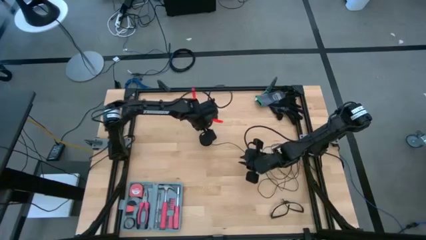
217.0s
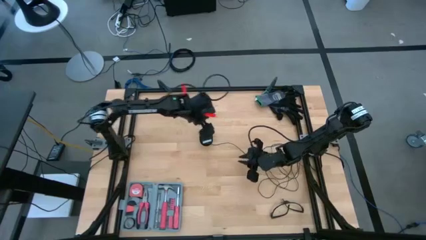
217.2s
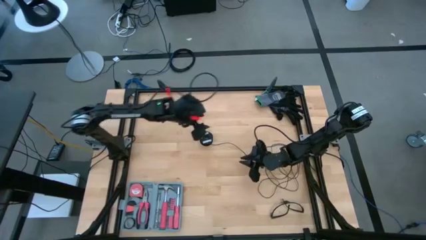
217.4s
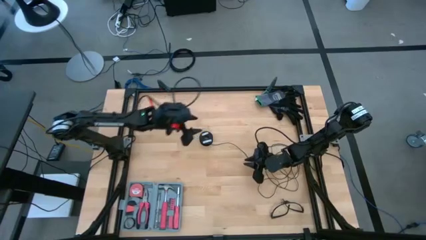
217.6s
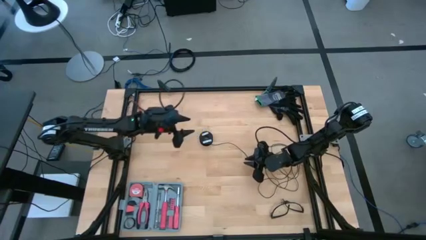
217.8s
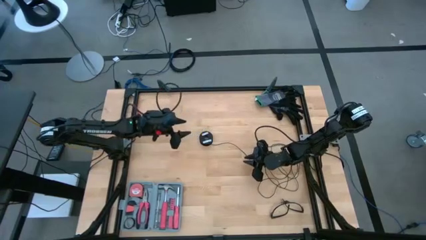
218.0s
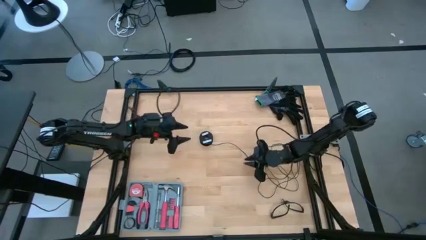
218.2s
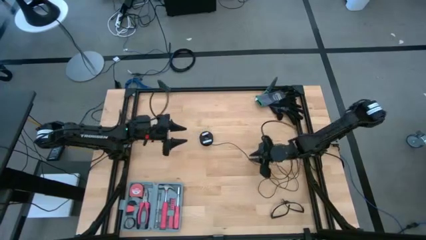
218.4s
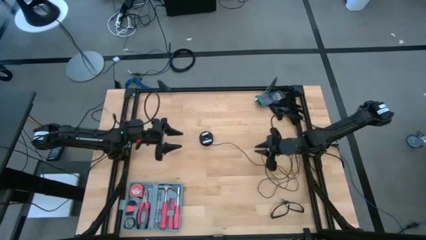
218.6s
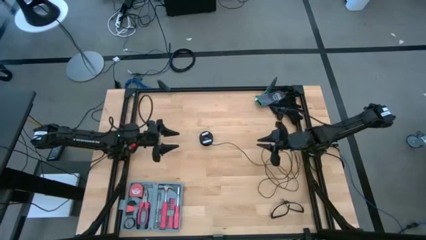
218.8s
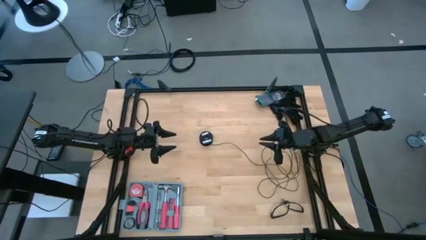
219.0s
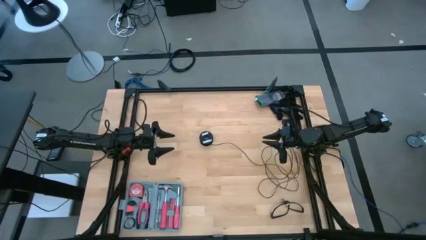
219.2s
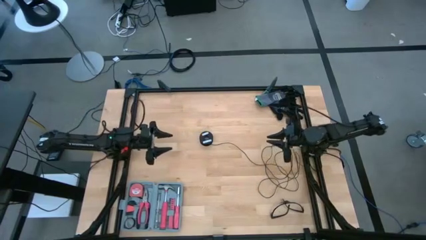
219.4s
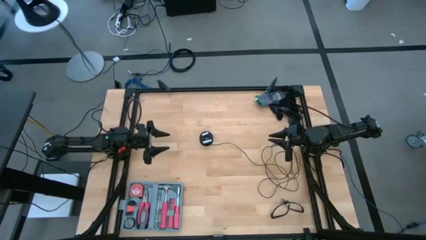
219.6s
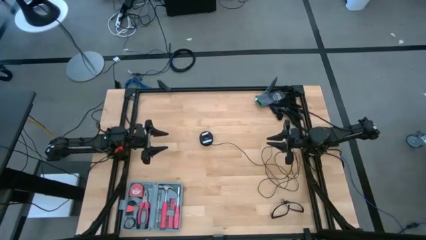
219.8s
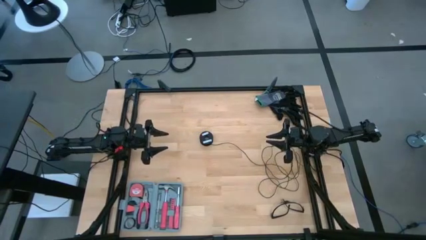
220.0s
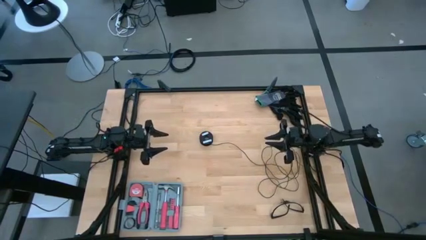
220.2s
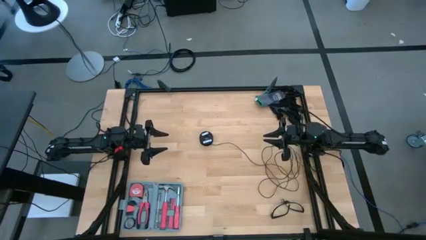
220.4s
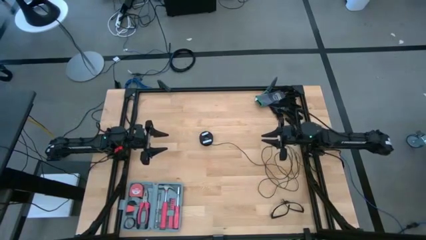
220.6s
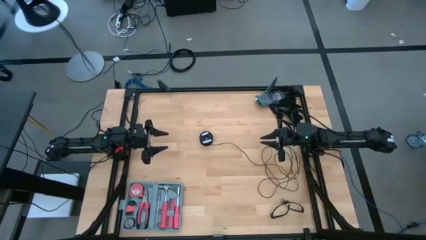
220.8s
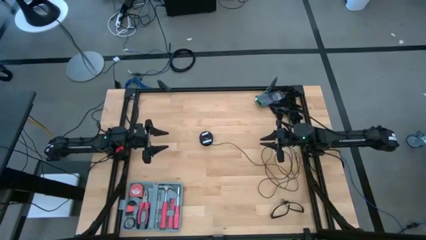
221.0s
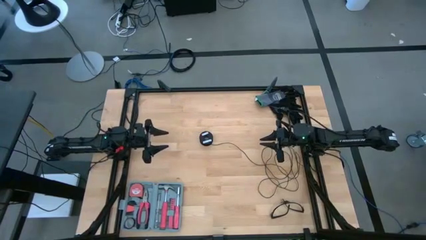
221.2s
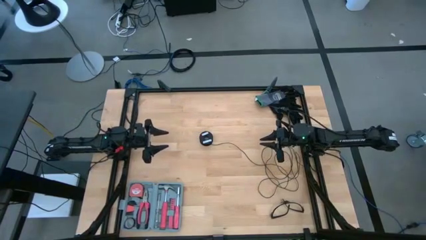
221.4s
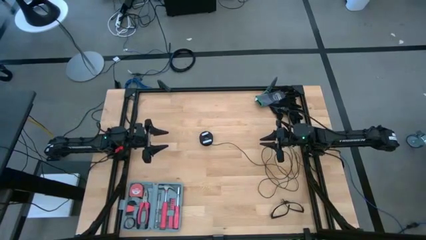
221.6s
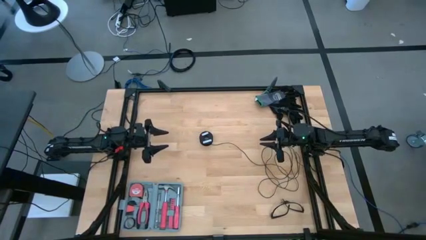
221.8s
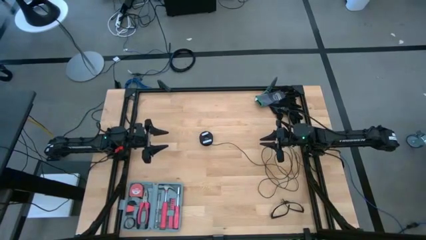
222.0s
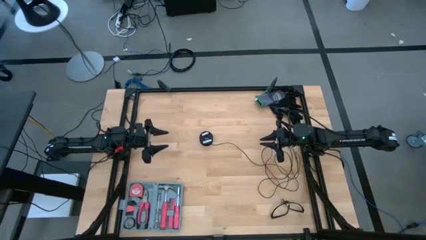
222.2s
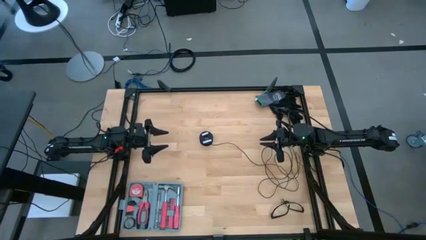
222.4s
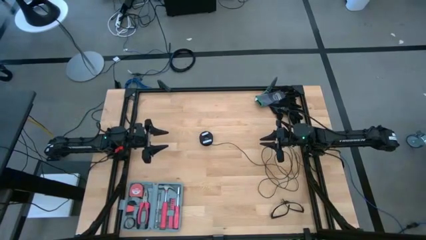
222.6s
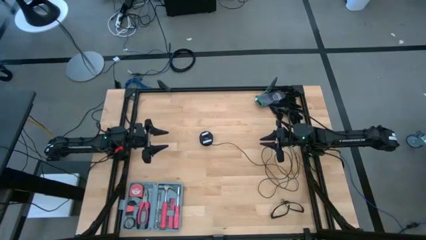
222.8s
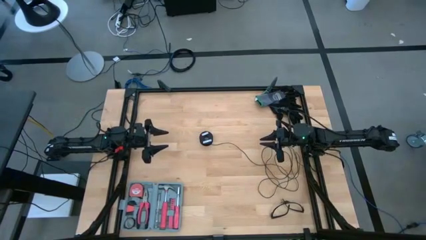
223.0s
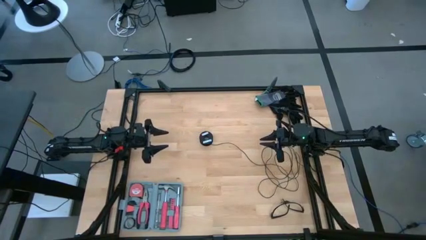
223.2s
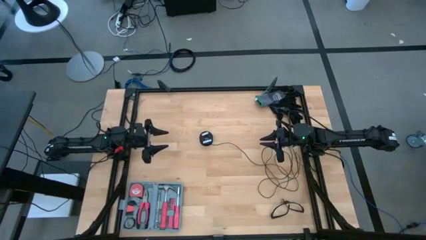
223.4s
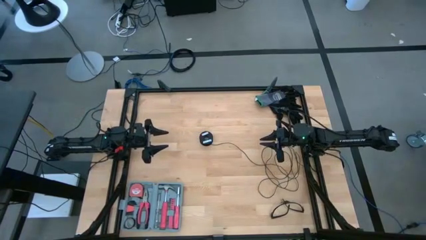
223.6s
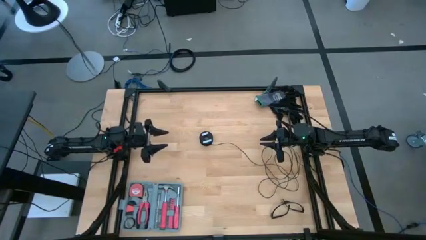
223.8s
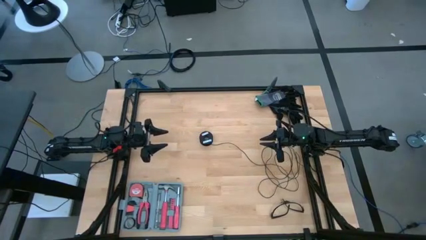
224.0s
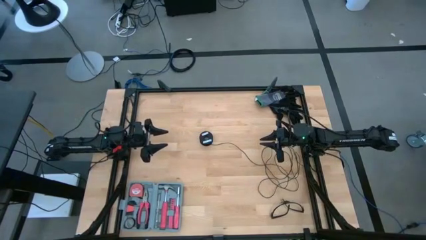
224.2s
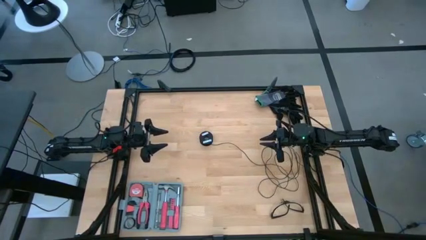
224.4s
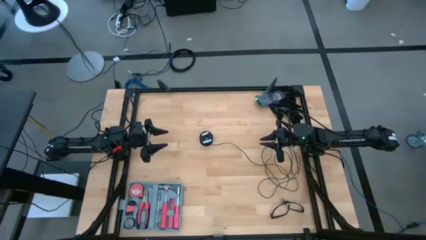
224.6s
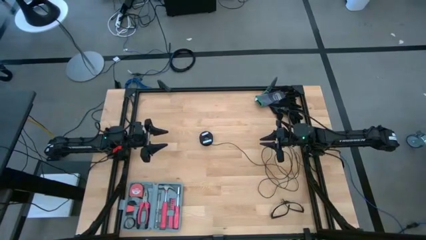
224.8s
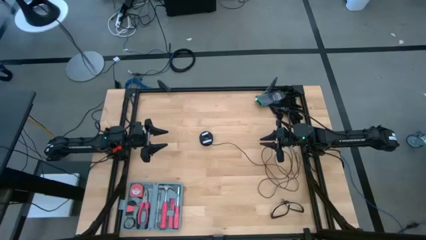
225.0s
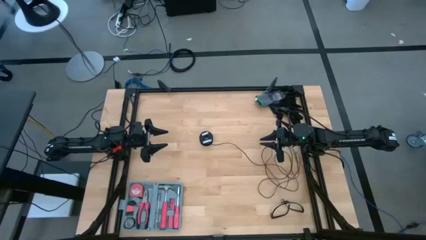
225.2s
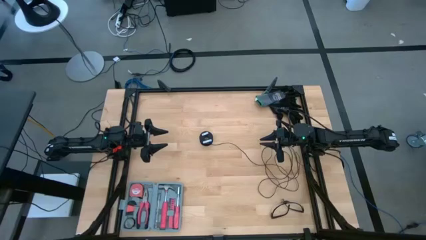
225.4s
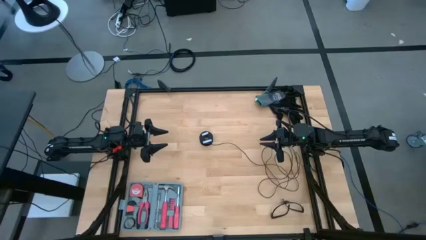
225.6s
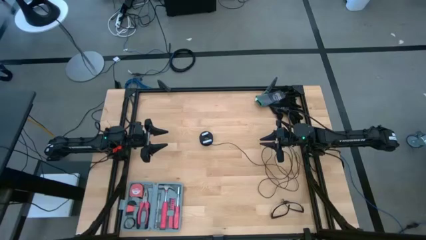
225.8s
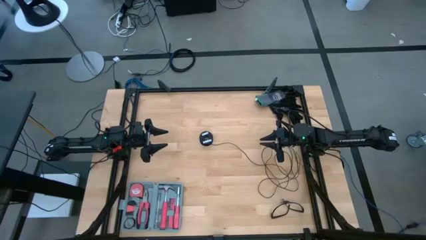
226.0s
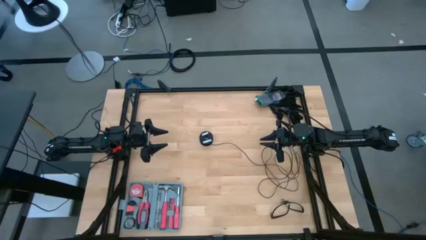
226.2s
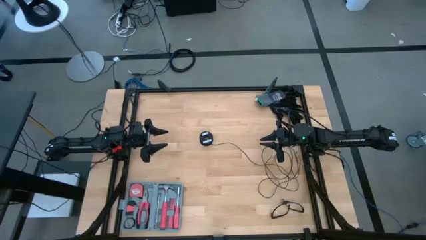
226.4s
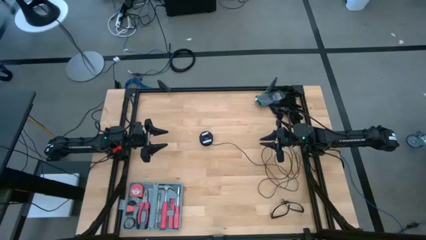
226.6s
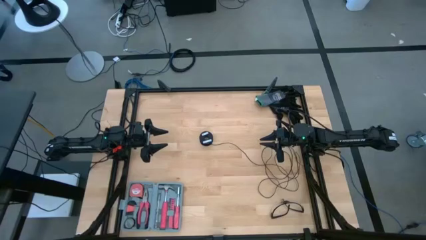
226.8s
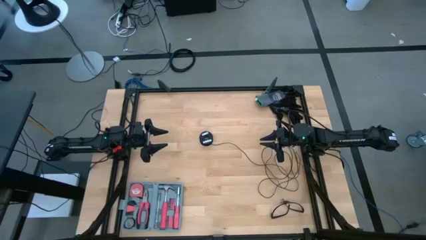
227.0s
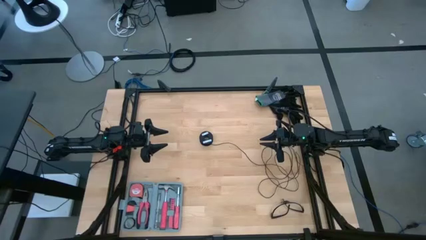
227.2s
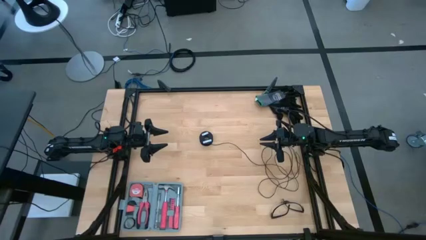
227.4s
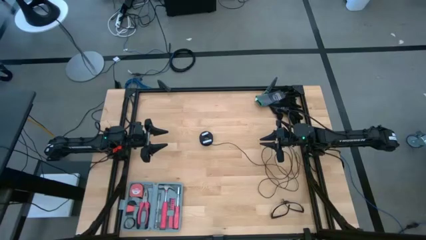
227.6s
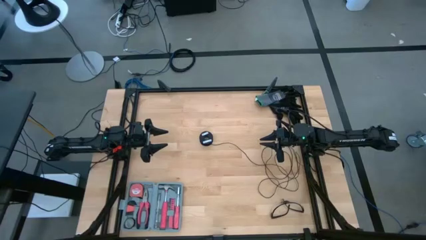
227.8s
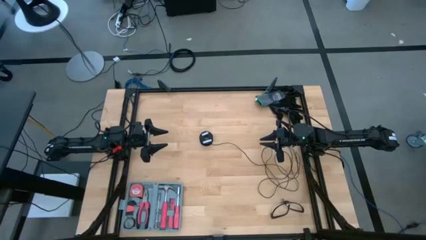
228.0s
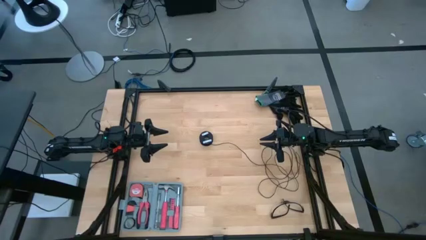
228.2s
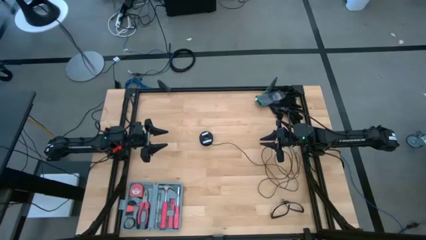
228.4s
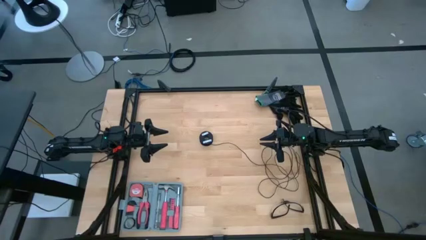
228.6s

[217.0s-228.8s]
Task: Coil cords
Return to Home Position

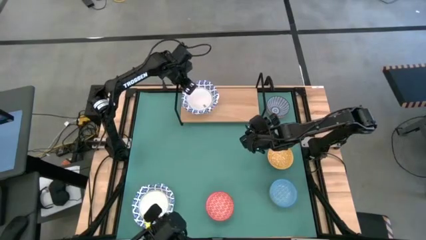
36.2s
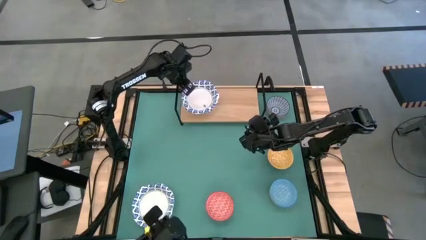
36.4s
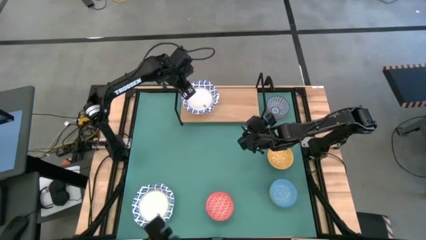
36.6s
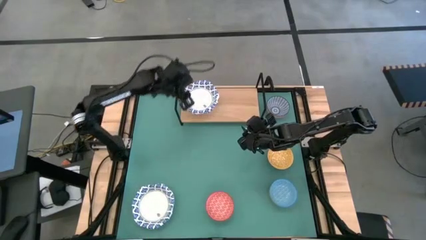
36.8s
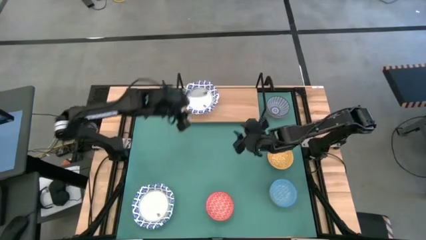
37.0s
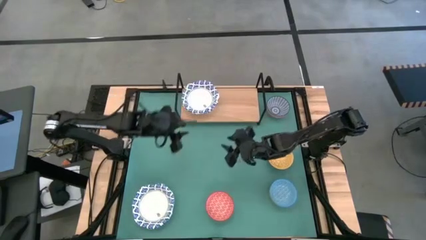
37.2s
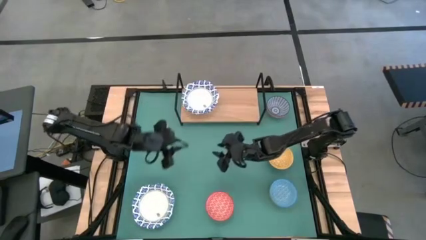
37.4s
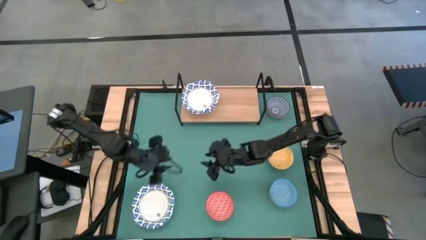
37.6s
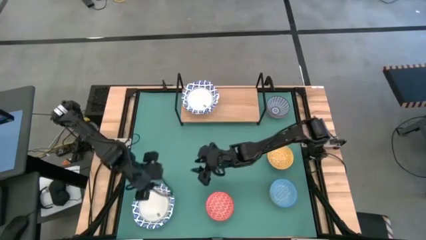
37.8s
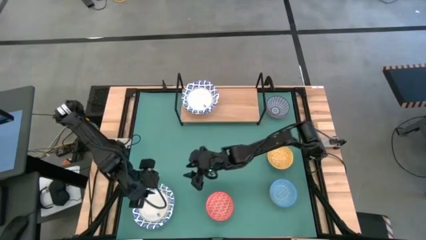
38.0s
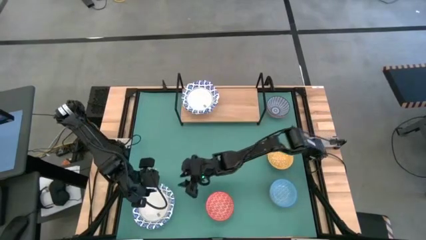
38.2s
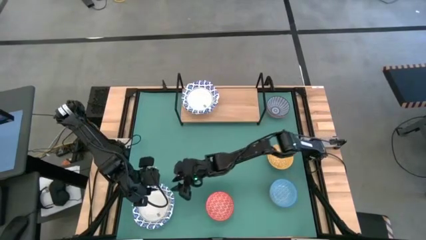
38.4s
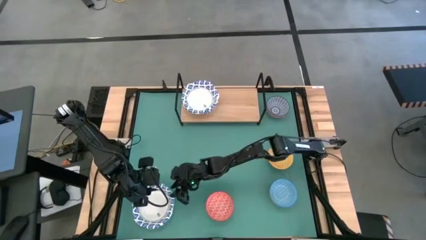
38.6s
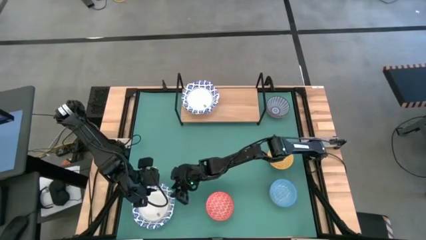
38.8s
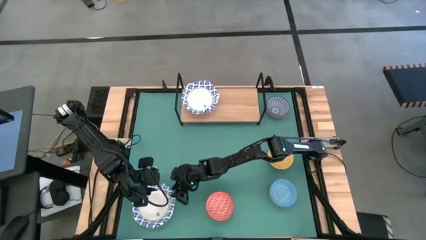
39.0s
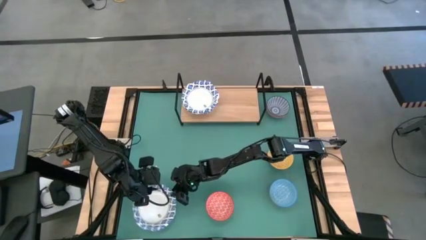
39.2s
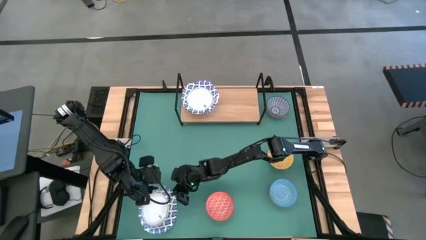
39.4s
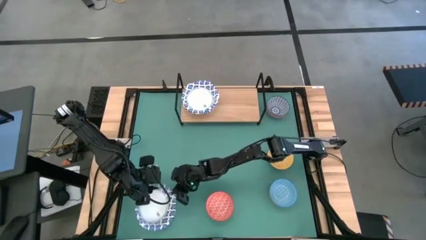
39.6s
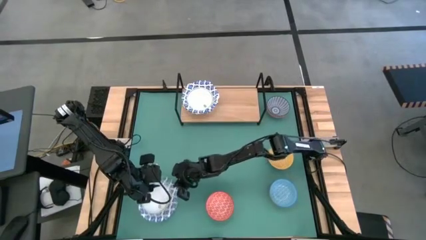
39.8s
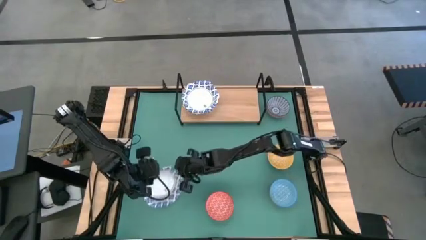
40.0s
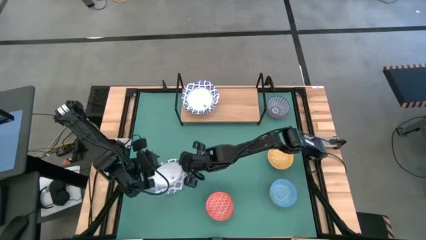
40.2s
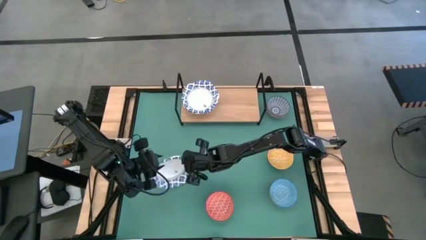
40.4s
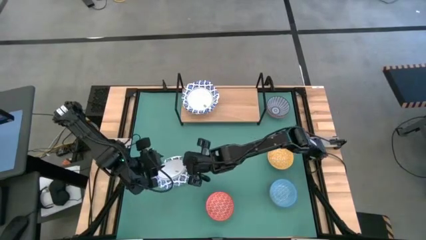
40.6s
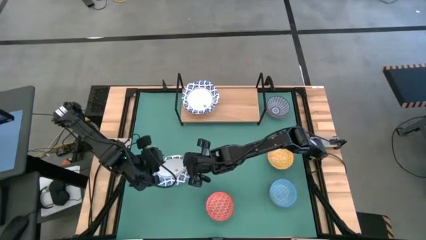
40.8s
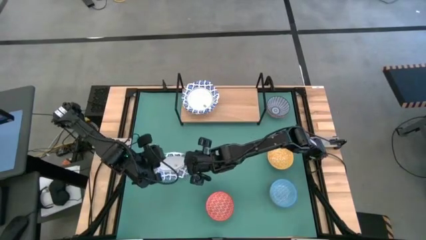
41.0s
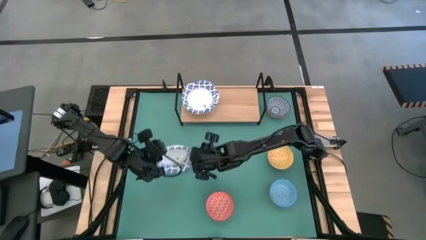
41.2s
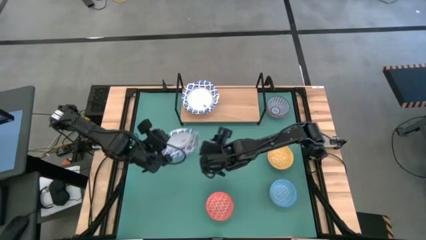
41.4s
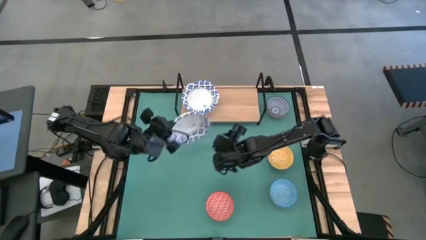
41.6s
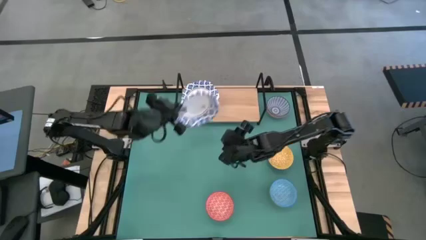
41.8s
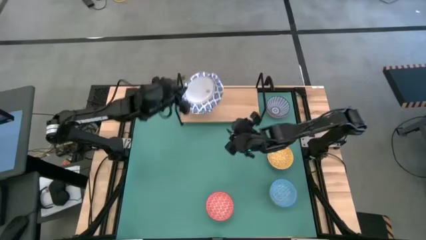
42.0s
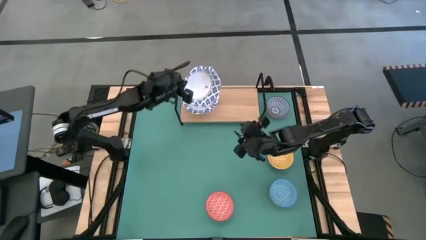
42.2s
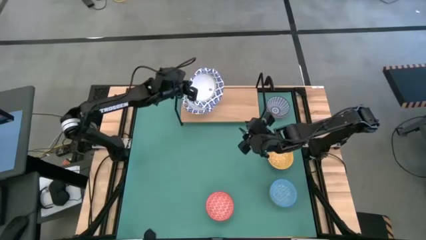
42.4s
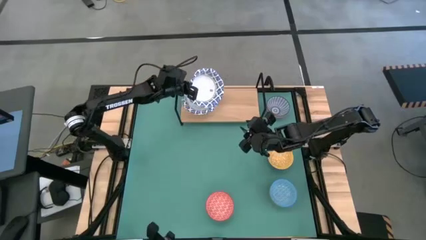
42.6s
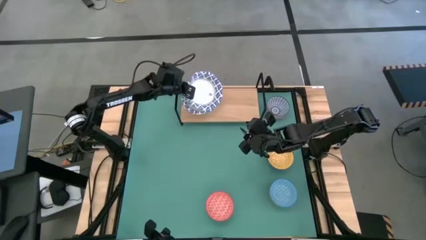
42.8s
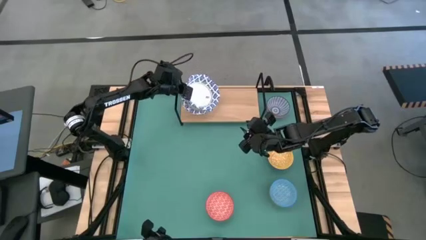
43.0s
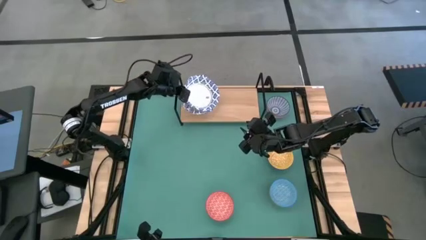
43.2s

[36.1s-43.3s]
Task: Place and stack bowls onto a shelf
Stack the white patterned bowl on top of the white patterned bowl on the shelf
